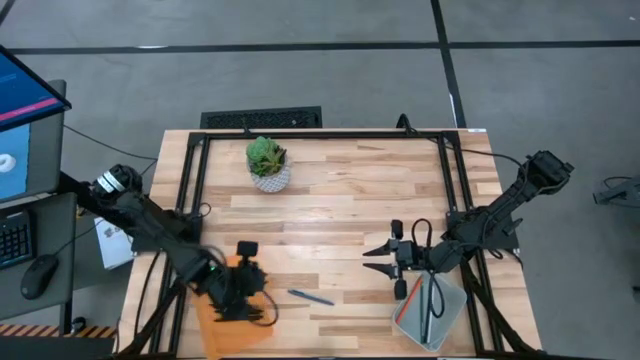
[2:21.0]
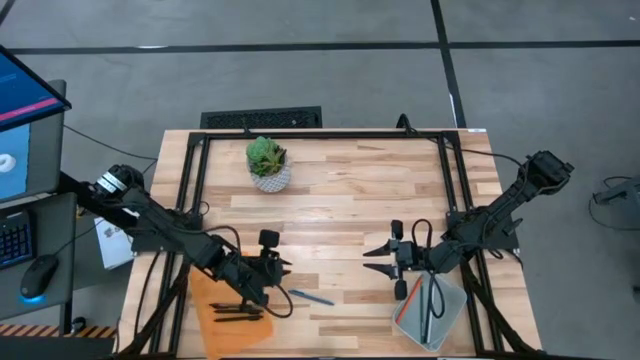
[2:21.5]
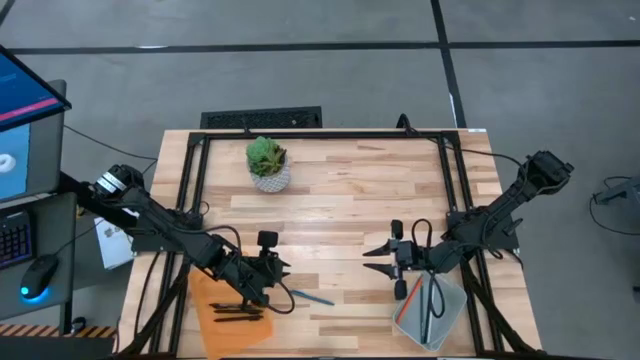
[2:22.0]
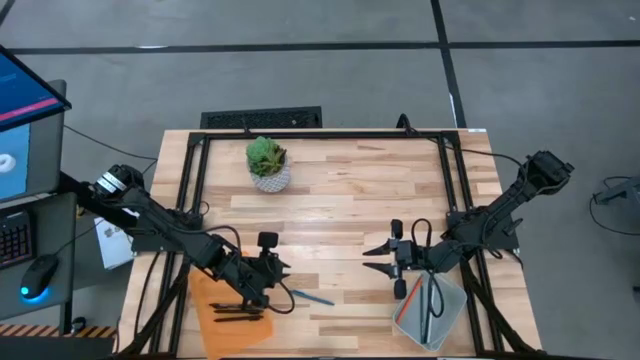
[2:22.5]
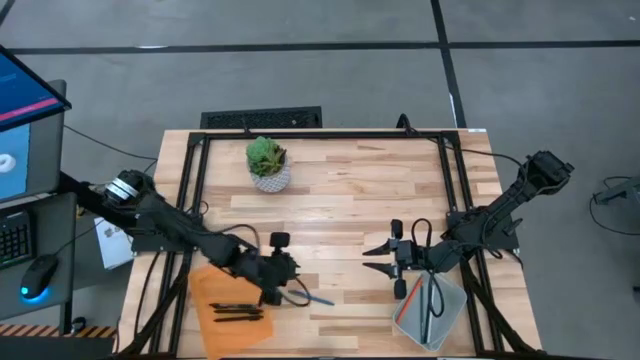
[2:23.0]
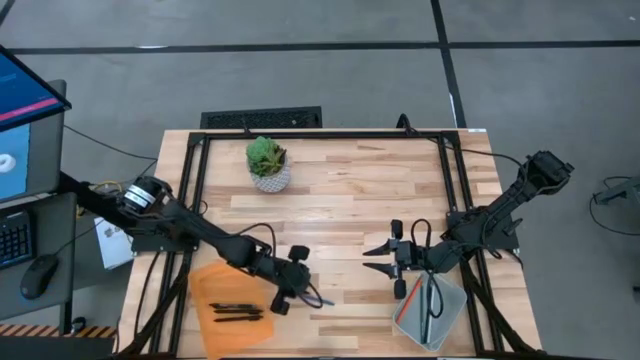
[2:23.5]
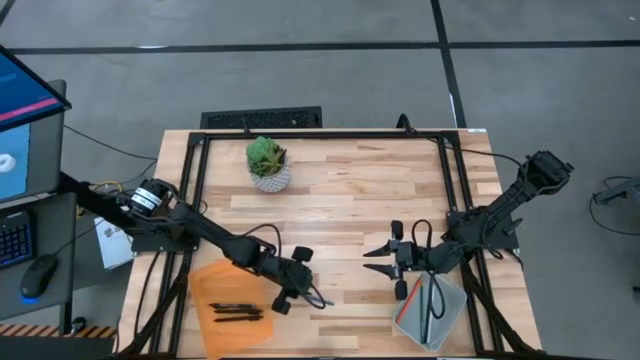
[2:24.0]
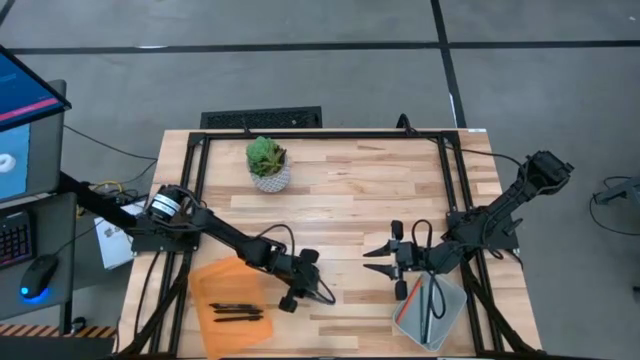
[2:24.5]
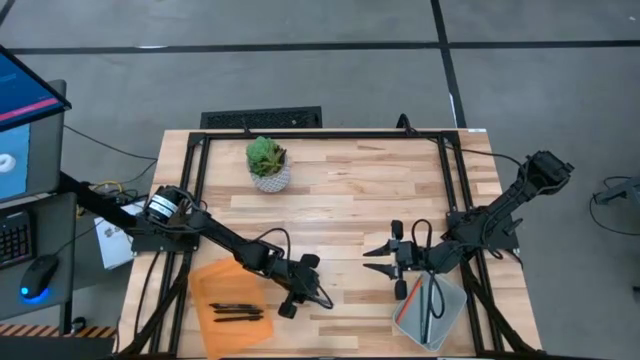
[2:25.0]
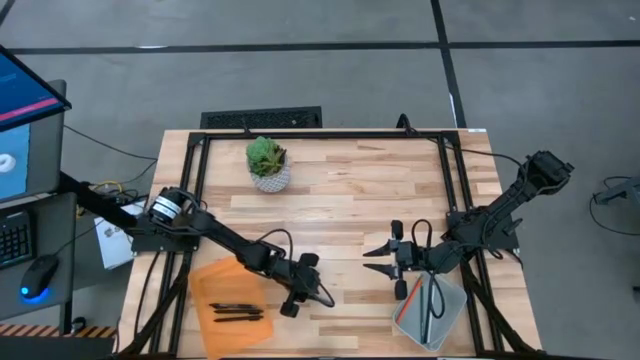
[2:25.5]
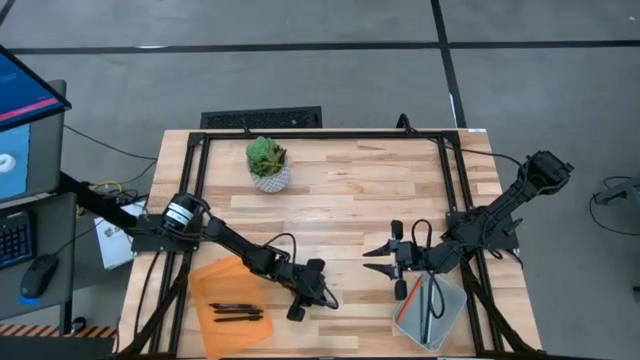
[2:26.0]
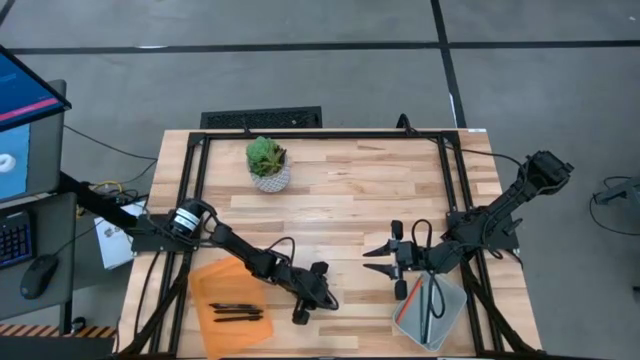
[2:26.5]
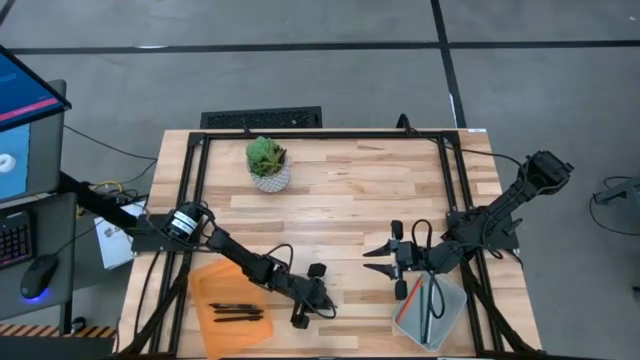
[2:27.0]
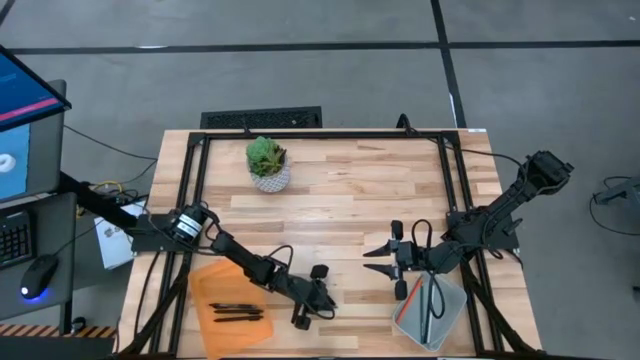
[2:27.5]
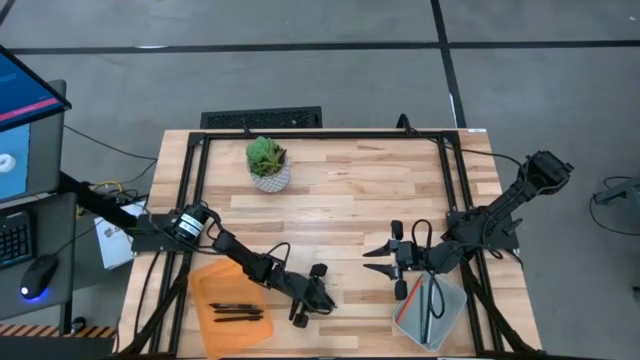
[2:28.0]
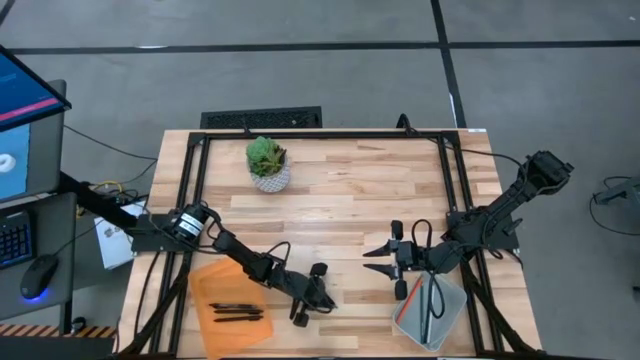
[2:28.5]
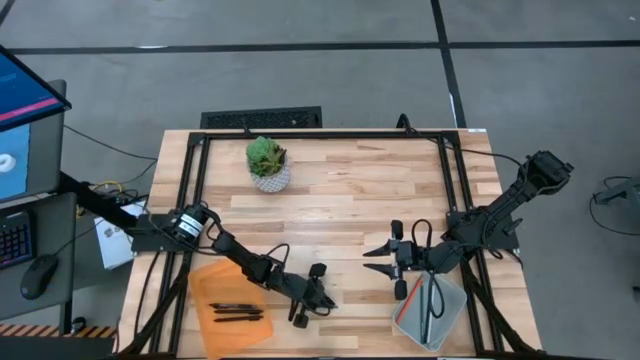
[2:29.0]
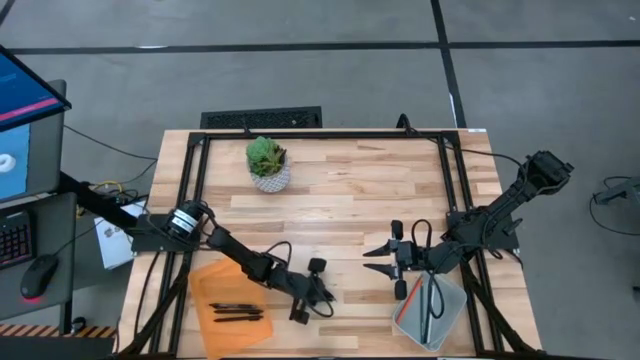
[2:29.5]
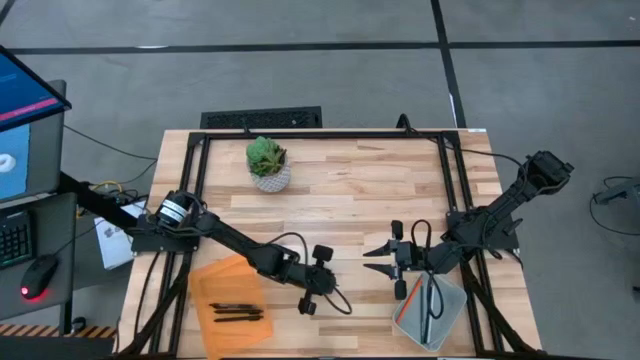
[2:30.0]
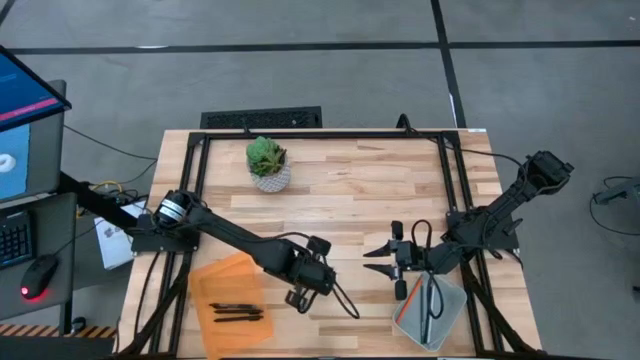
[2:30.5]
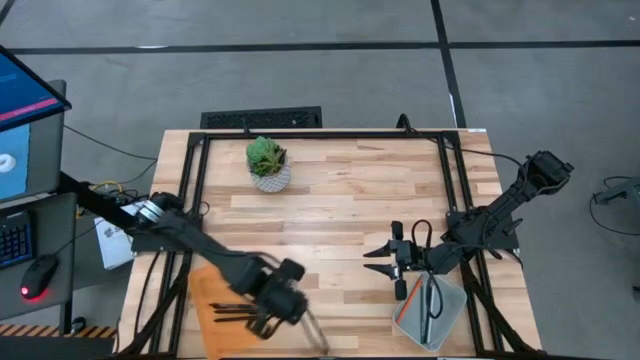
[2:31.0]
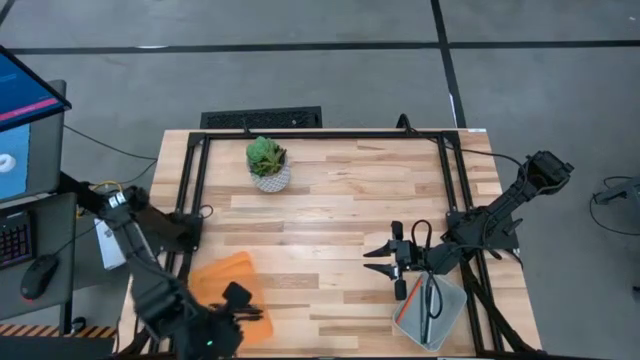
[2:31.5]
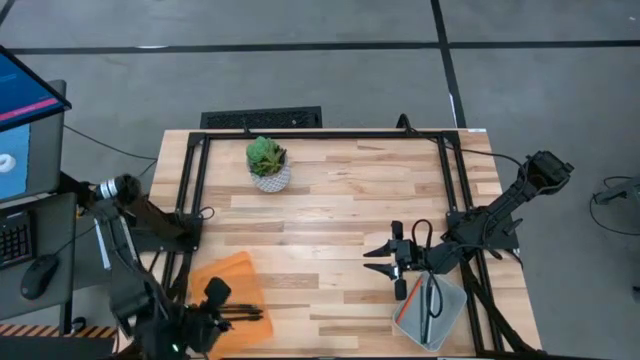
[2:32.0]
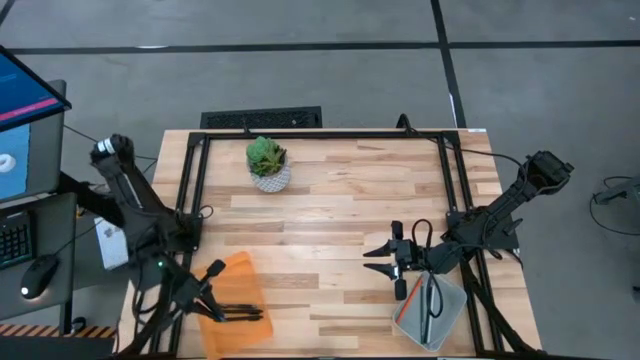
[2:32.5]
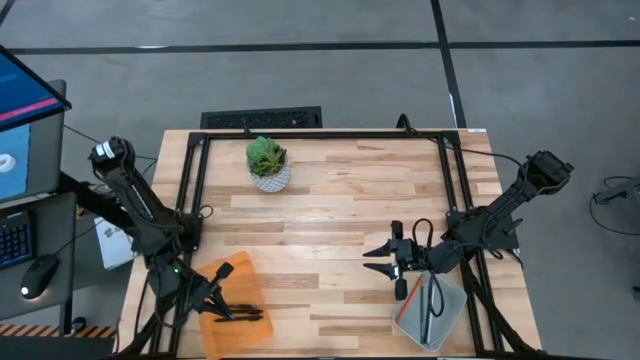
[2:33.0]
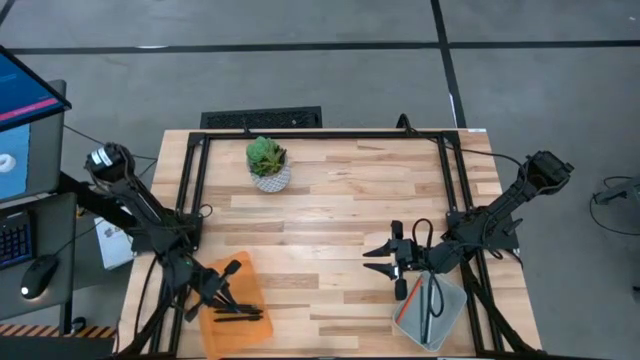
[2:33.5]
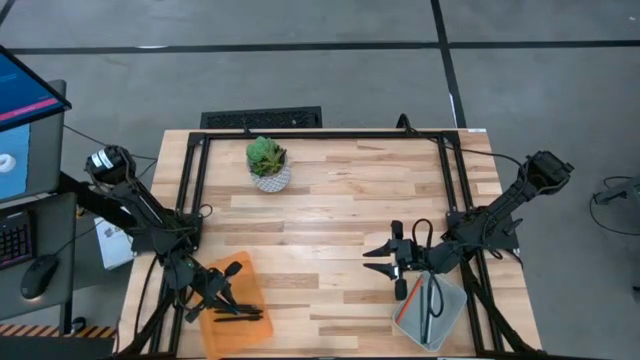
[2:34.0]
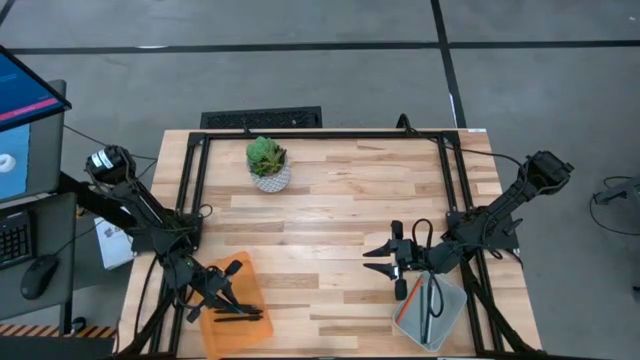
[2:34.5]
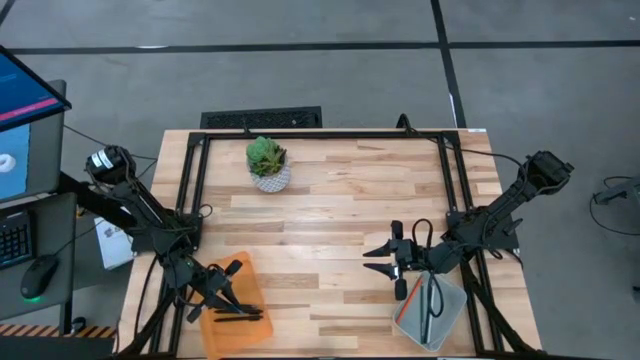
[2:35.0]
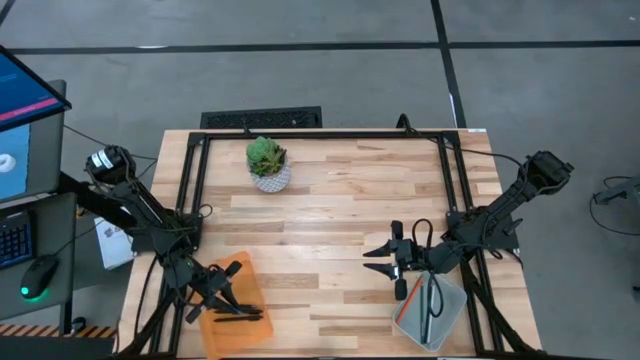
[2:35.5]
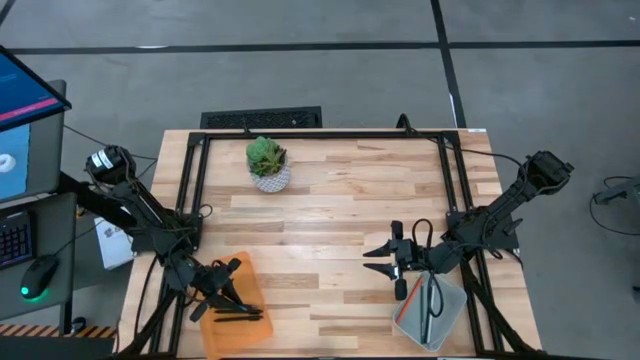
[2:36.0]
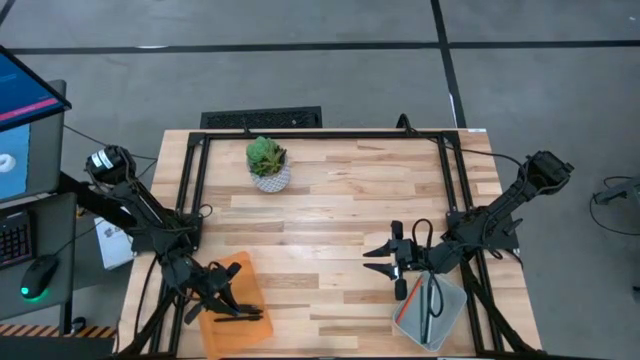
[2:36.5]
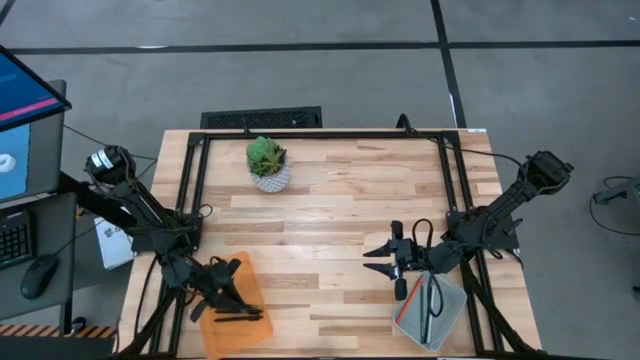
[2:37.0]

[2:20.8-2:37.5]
Task: Sort pens & pencils
Put the blue pen into the orange bin
